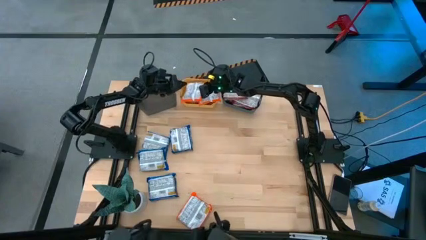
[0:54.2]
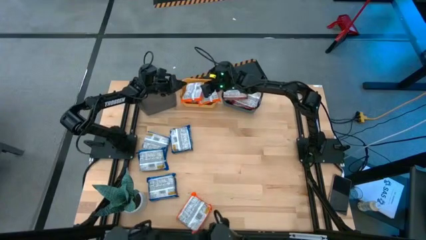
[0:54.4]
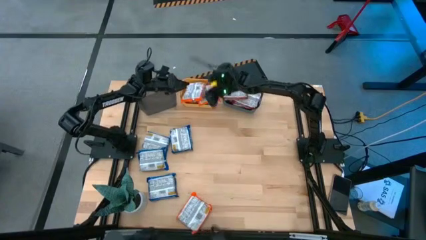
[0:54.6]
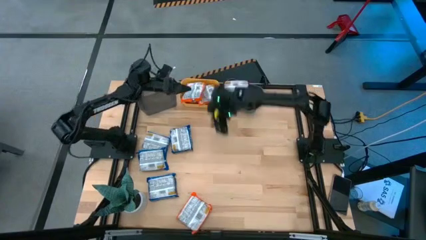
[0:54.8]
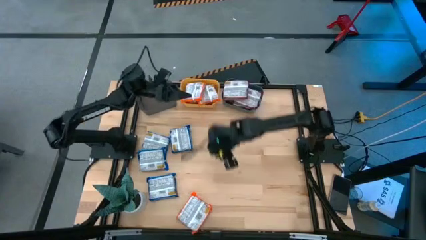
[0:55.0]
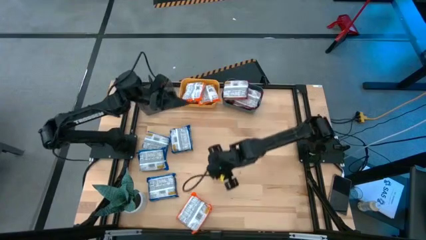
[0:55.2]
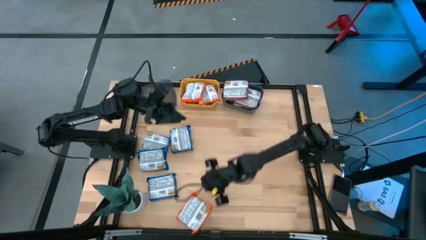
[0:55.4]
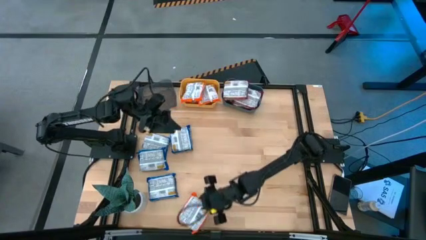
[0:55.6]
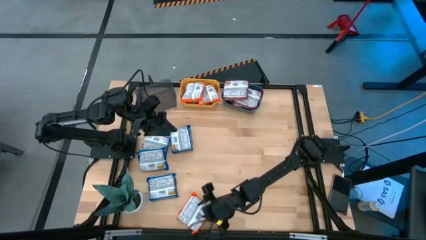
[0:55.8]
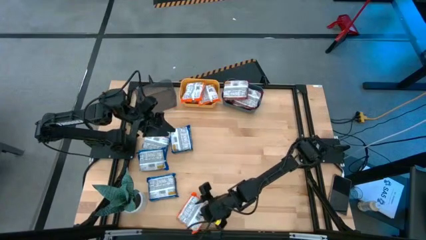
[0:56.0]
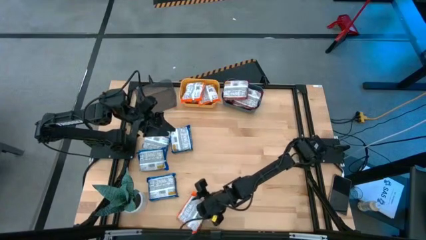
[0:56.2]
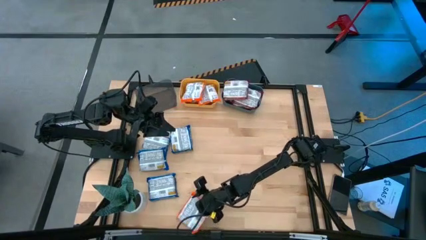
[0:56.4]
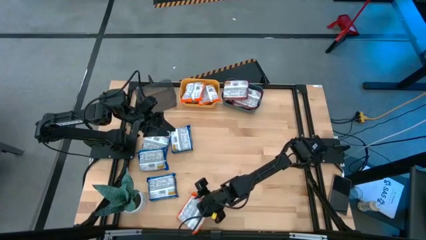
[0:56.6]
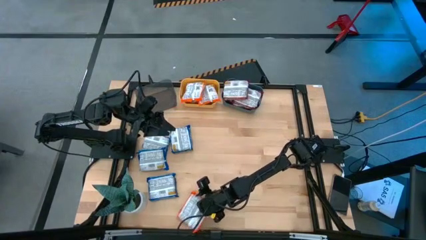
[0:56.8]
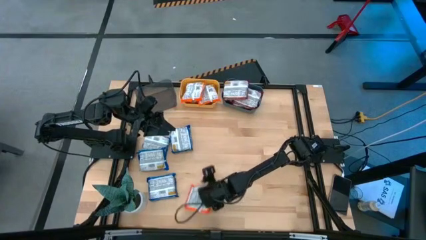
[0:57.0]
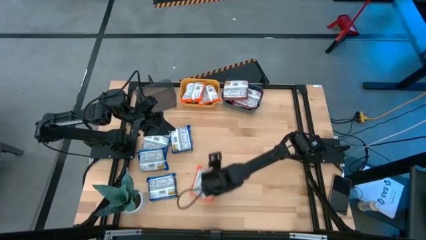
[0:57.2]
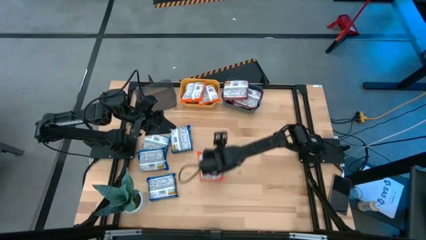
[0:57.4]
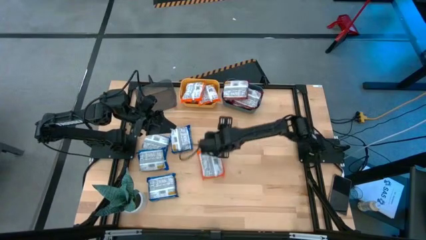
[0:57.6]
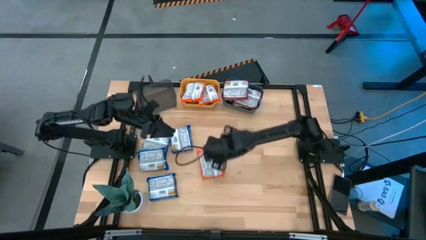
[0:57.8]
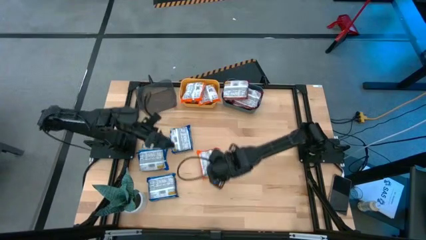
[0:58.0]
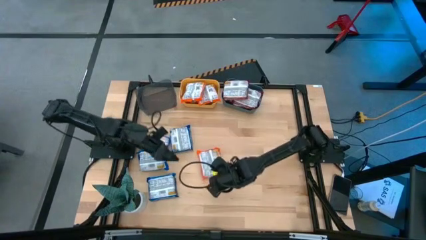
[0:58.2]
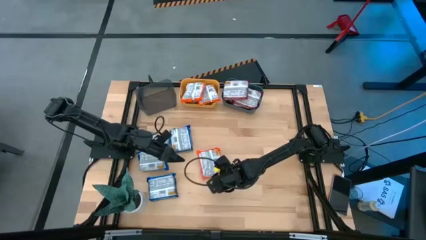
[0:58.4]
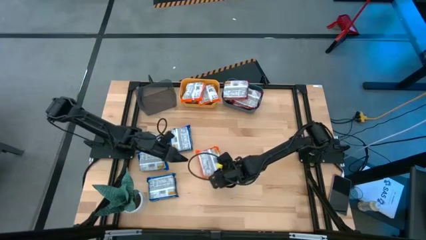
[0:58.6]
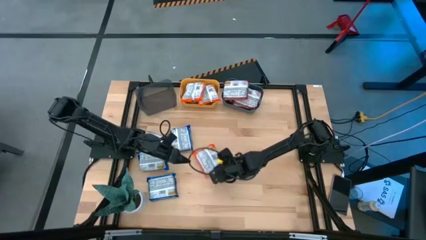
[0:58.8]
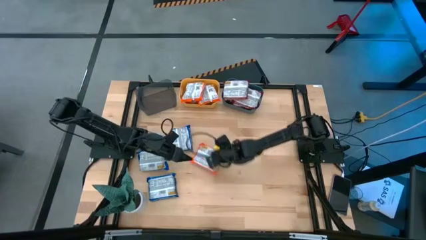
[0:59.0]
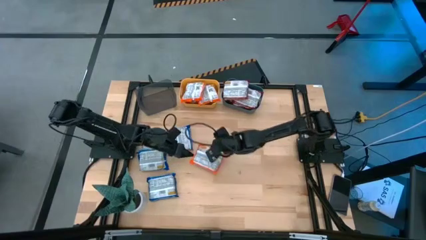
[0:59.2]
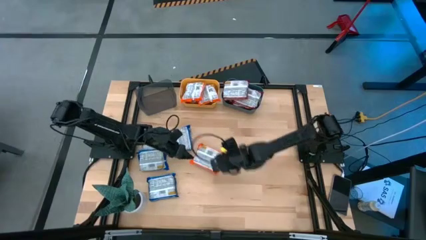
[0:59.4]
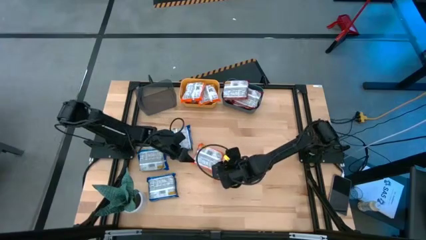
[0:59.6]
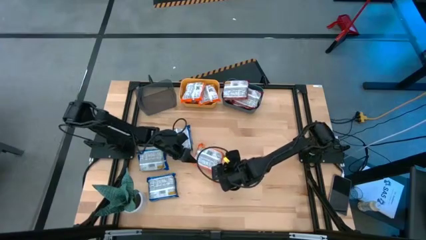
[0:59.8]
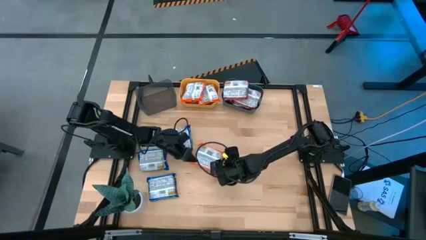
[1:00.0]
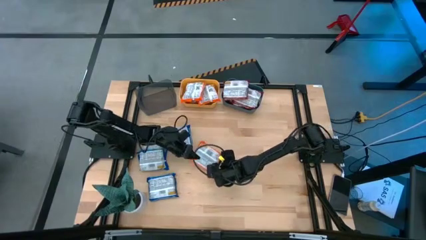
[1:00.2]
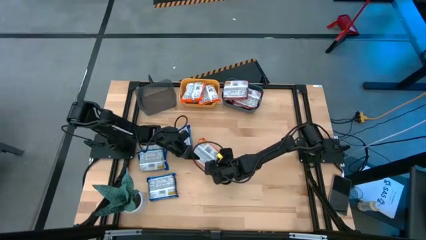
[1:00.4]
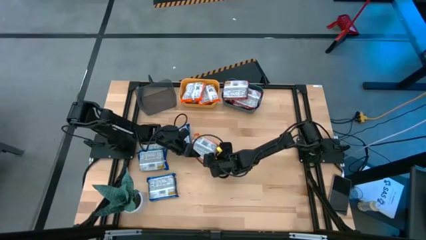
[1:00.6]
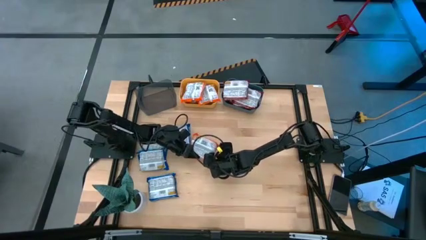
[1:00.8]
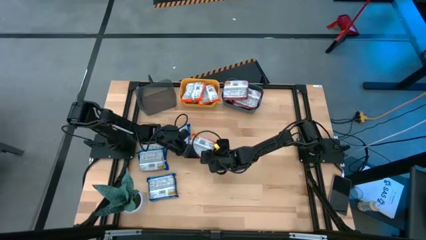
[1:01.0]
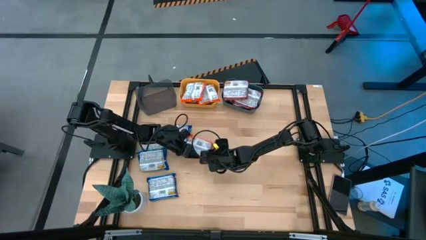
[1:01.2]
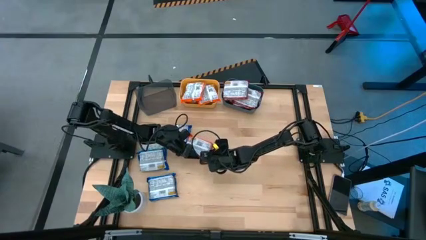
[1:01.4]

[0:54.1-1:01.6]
Task: Sort Maruchan noodles
Put the orange noodle pack into the yellow bin

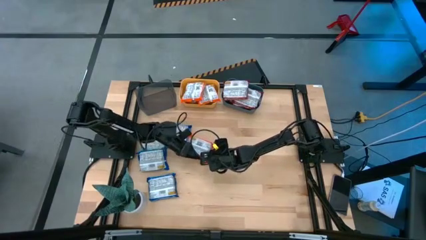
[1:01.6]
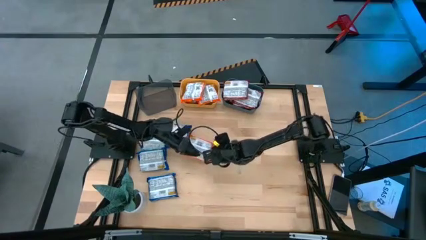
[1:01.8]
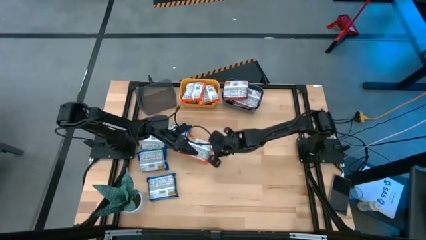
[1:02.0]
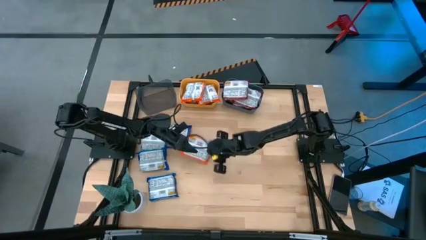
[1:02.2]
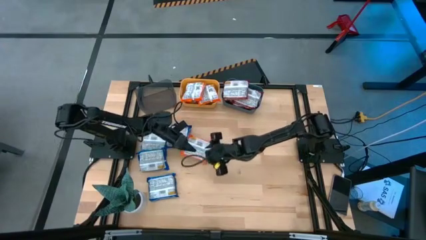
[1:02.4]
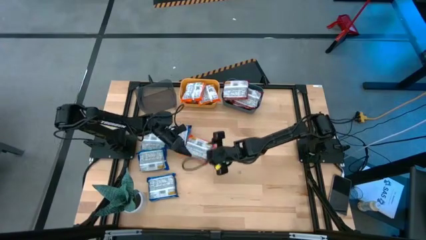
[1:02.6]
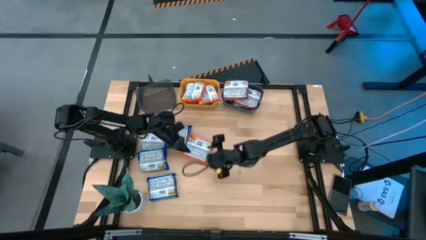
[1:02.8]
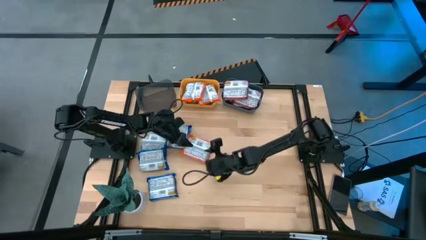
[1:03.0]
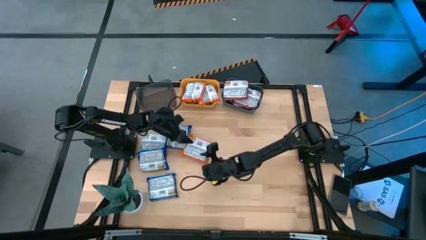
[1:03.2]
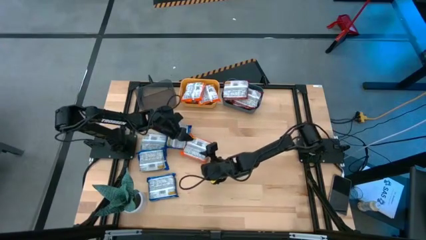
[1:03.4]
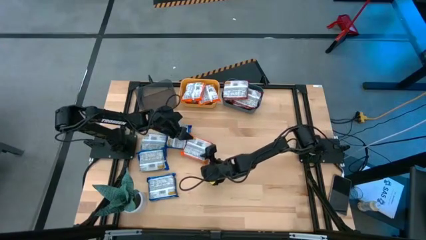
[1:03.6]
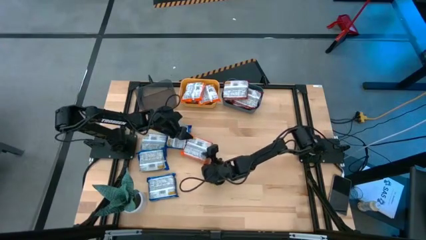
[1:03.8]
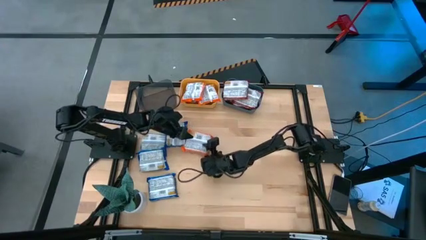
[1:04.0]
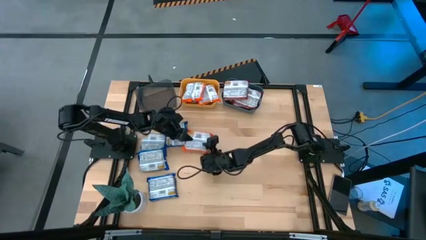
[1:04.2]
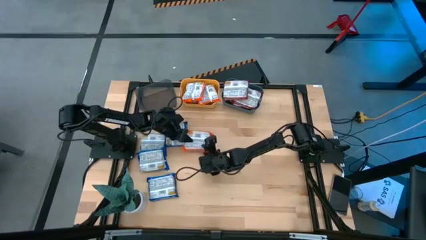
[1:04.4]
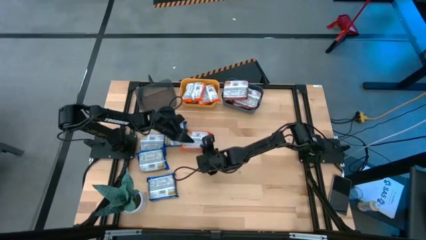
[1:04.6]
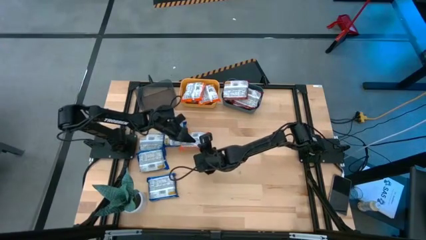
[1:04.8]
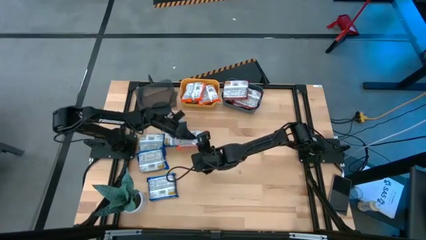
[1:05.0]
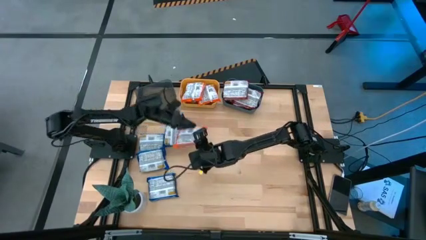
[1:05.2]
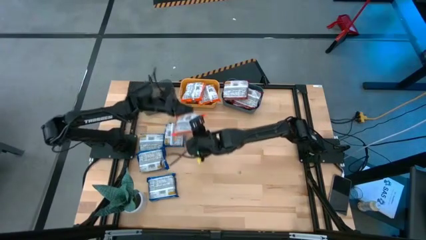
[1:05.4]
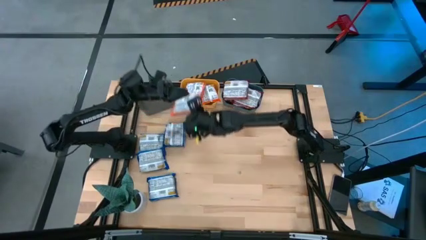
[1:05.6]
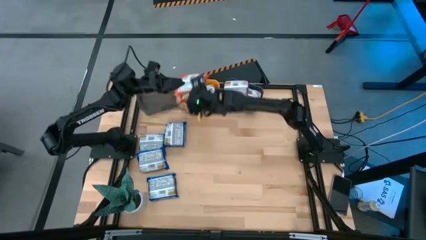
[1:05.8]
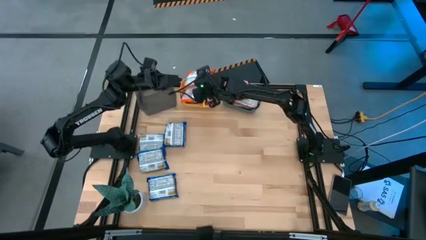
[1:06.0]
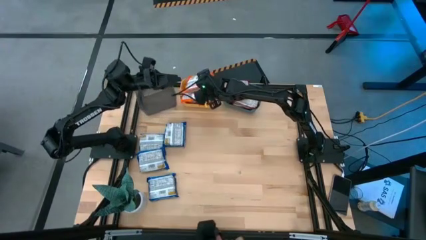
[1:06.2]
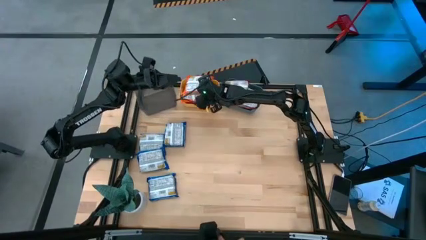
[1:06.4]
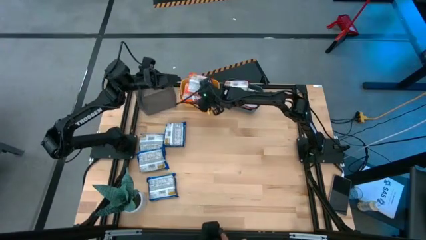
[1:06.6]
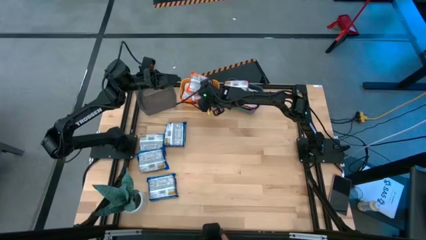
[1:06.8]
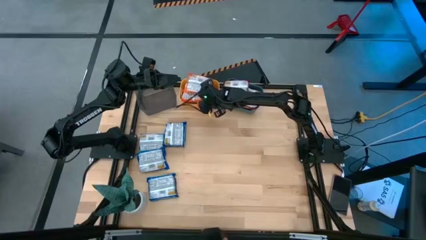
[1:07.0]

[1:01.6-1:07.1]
Put the orange noodle pack into the yellow bin

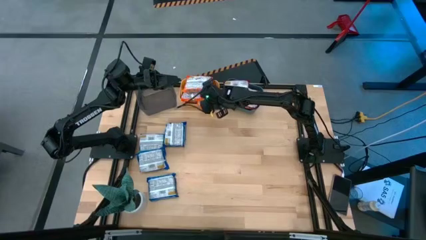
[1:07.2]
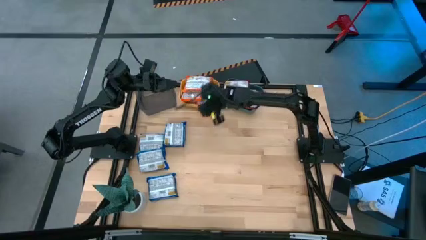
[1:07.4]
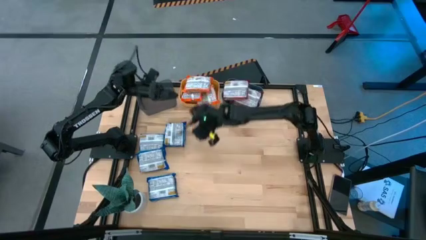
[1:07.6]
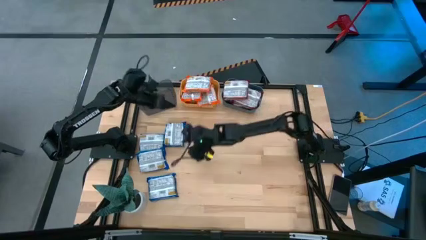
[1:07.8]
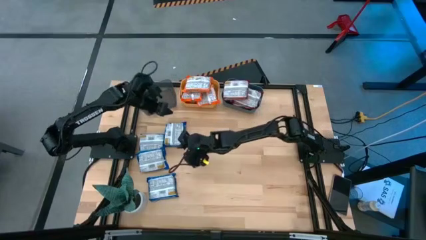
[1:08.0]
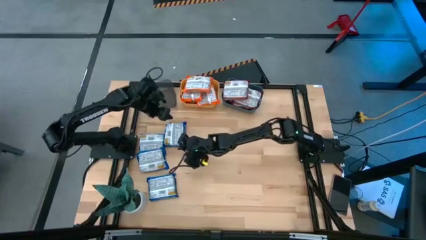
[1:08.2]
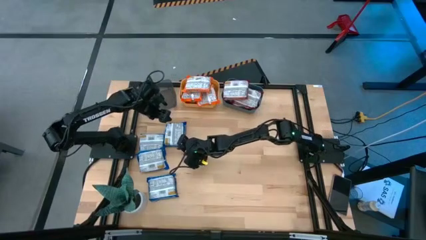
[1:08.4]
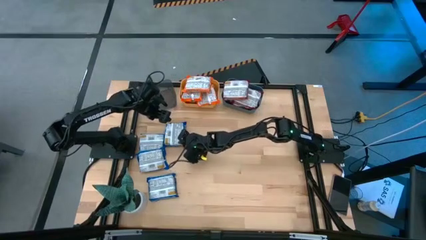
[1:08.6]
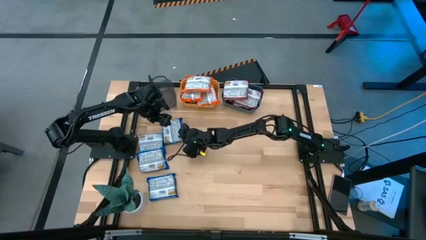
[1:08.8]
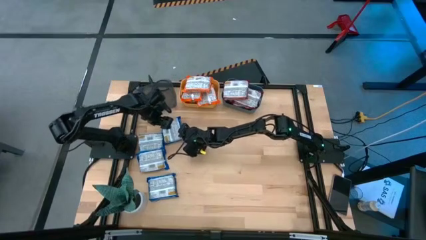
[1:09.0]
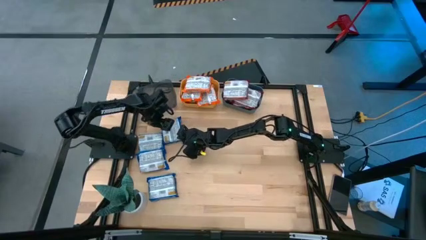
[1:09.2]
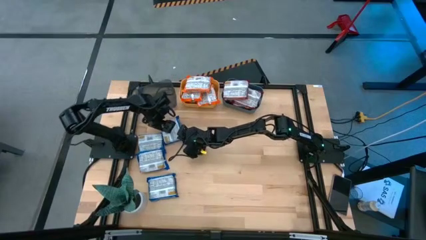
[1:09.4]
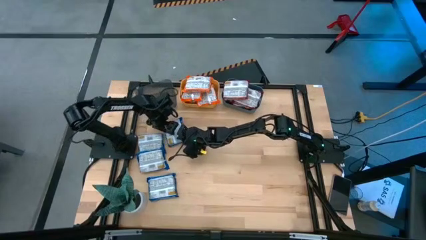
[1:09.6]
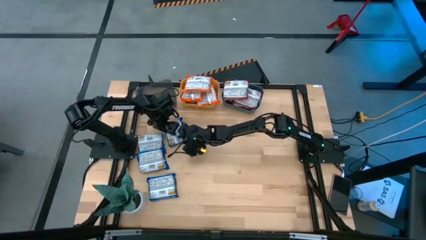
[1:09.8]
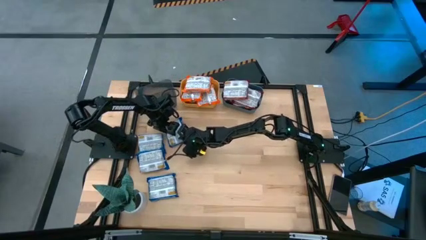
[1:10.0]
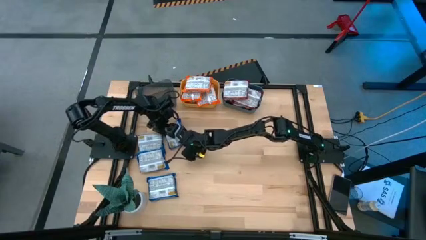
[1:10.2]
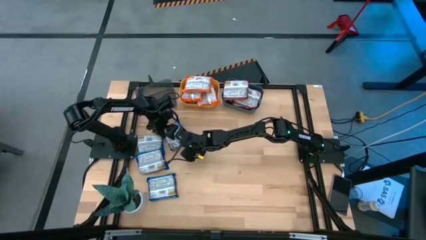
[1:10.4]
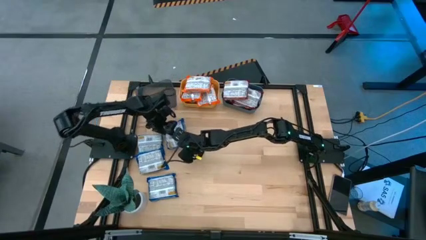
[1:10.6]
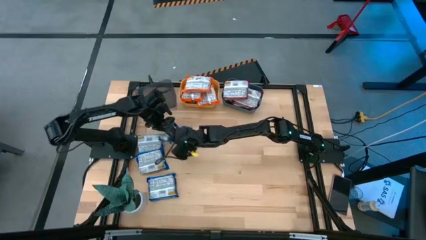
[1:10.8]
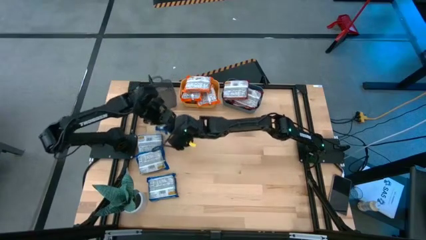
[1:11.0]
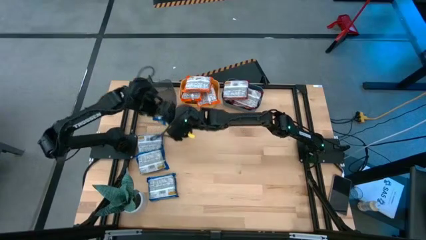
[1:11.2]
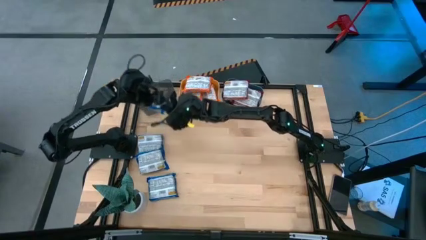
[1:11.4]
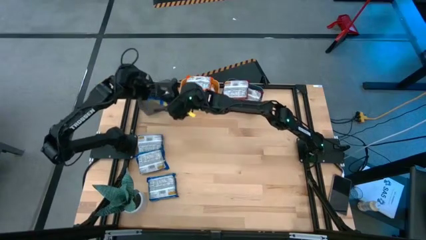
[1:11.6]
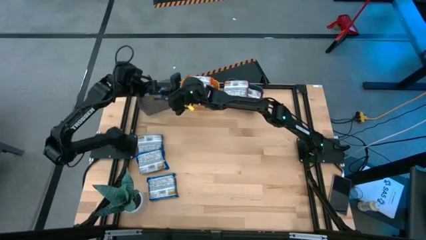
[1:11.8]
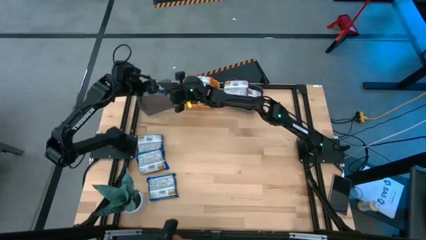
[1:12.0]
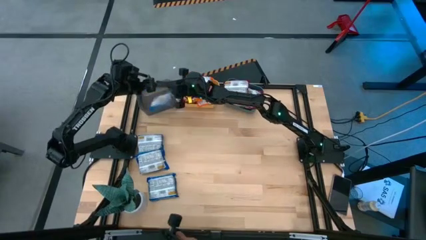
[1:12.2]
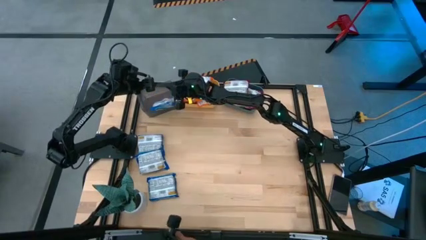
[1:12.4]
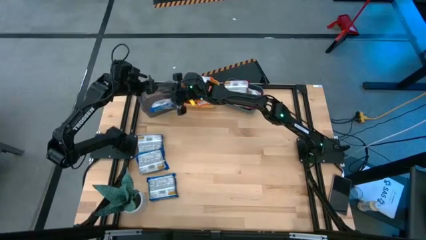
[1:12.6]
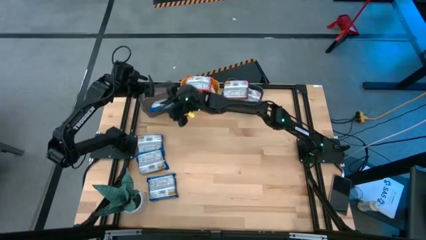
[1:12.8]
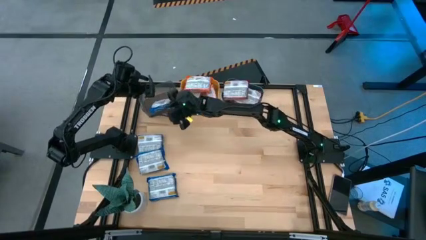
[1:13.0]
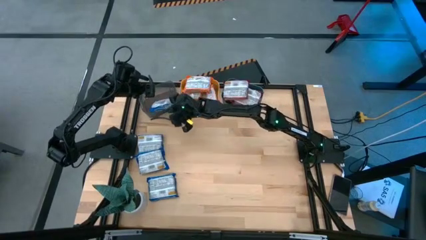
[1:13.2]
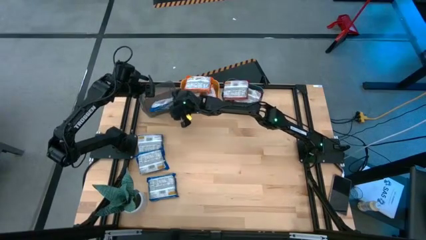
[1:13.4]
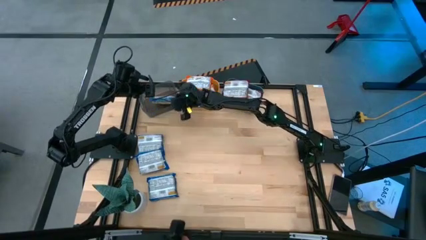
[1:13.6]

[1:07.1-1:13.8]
Put the blue noodle pack into the black bin
